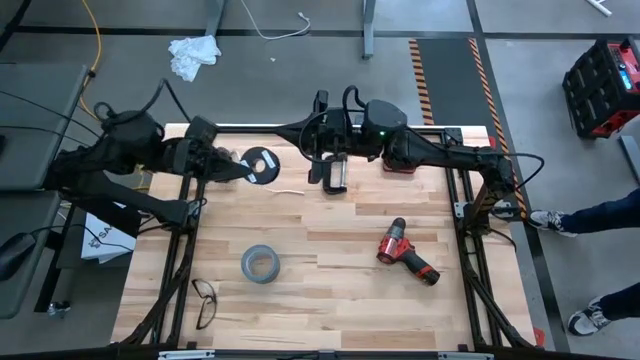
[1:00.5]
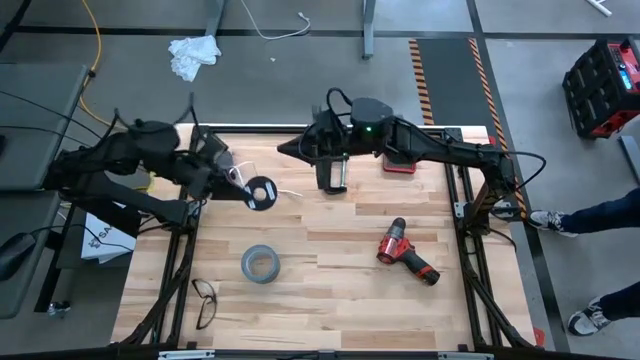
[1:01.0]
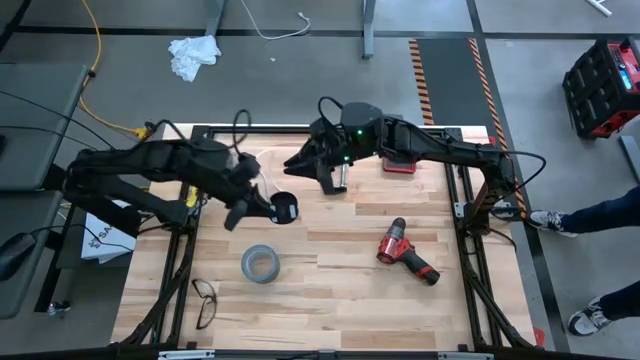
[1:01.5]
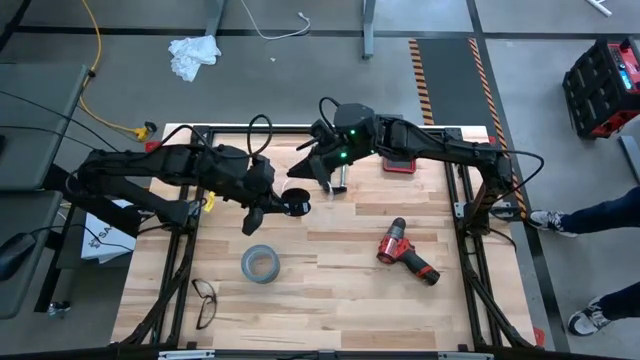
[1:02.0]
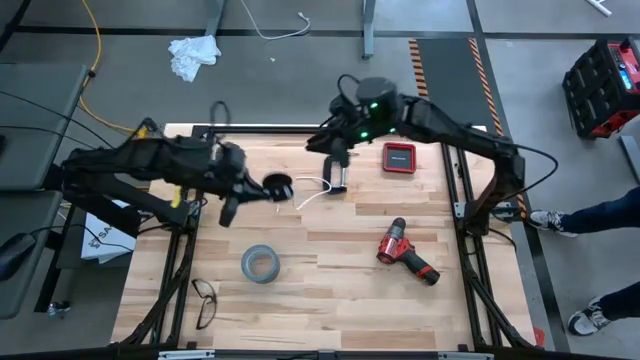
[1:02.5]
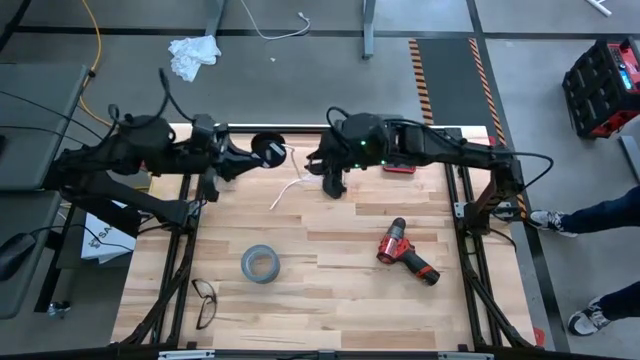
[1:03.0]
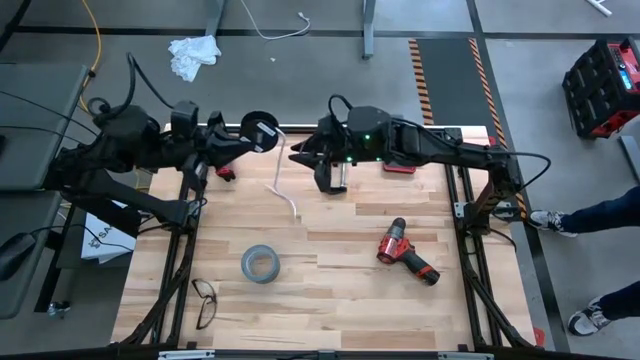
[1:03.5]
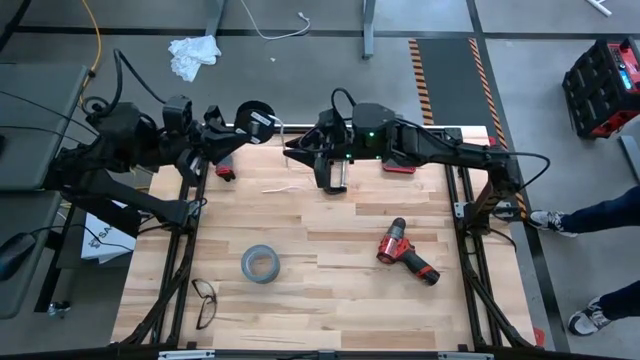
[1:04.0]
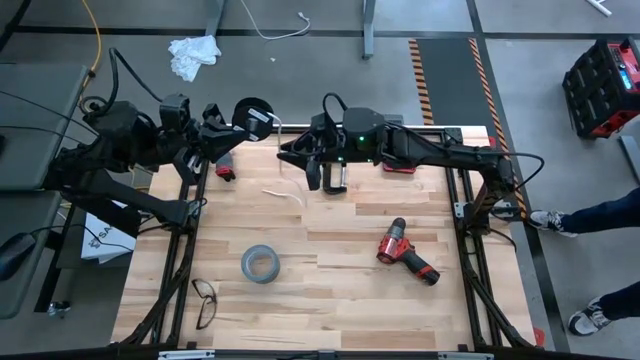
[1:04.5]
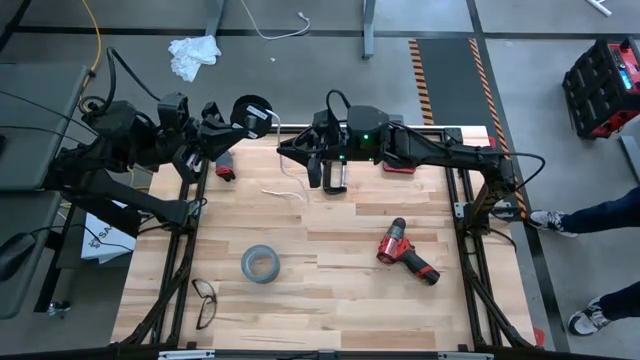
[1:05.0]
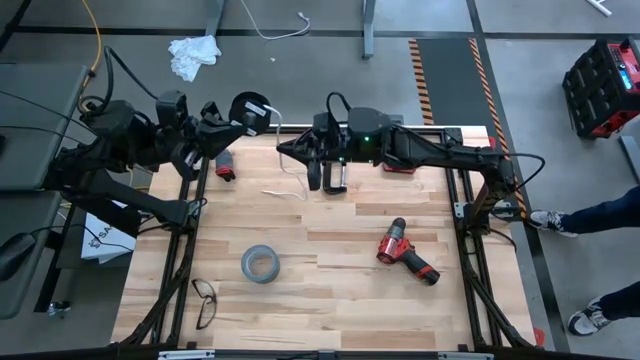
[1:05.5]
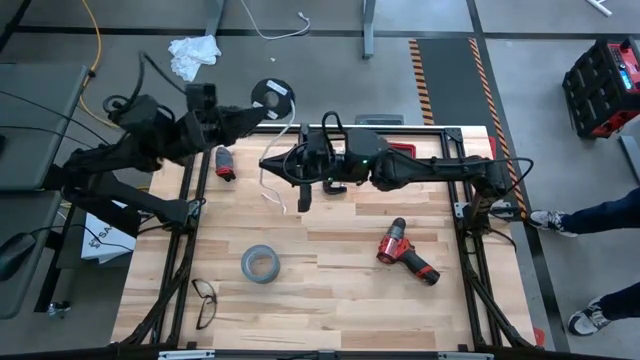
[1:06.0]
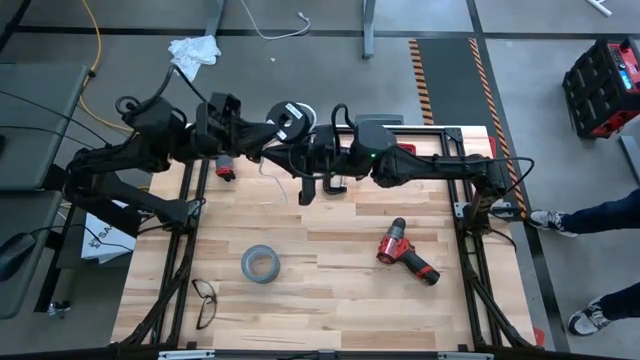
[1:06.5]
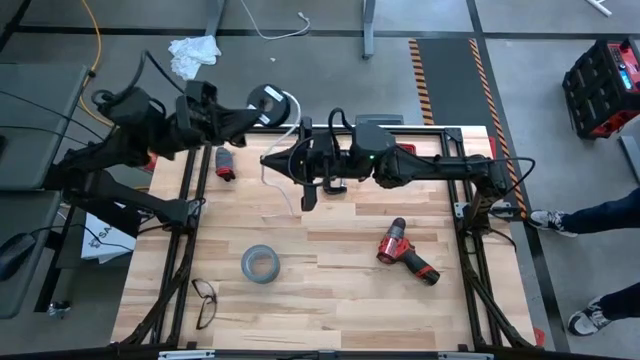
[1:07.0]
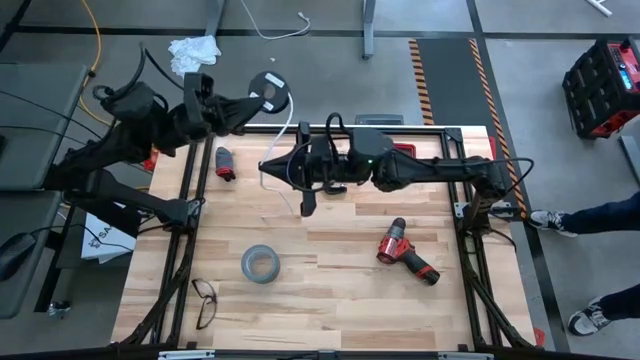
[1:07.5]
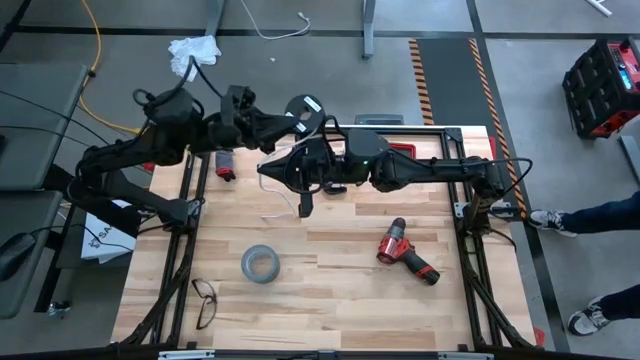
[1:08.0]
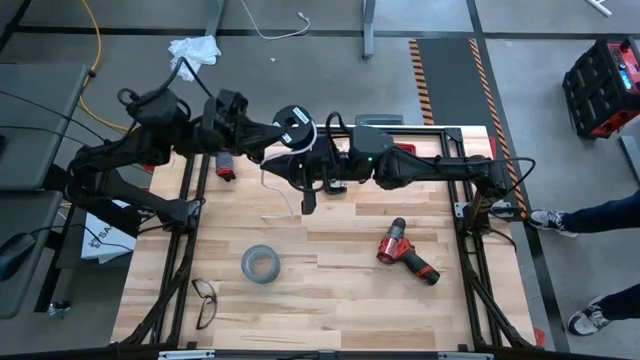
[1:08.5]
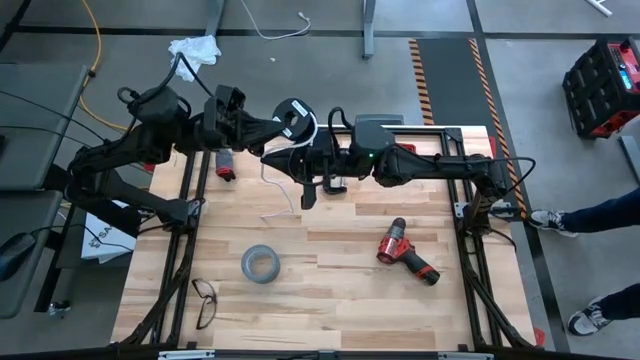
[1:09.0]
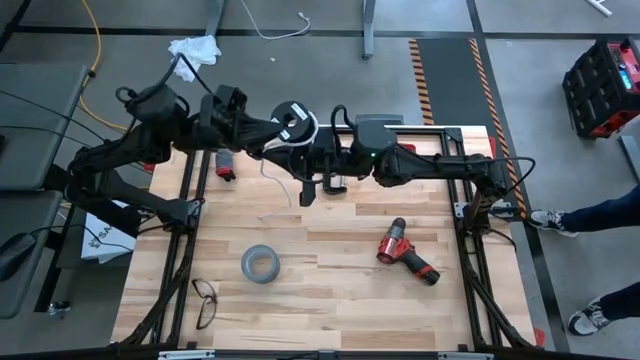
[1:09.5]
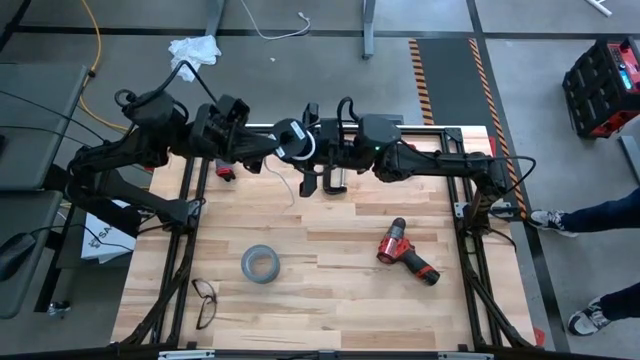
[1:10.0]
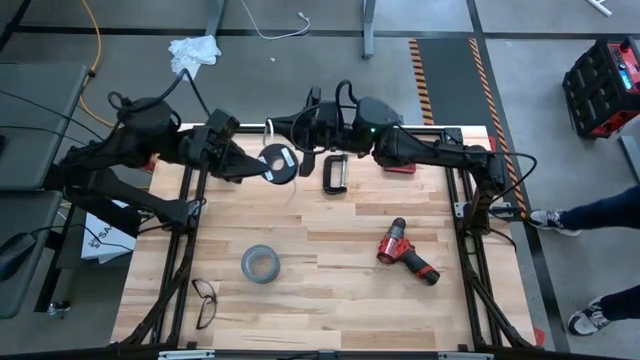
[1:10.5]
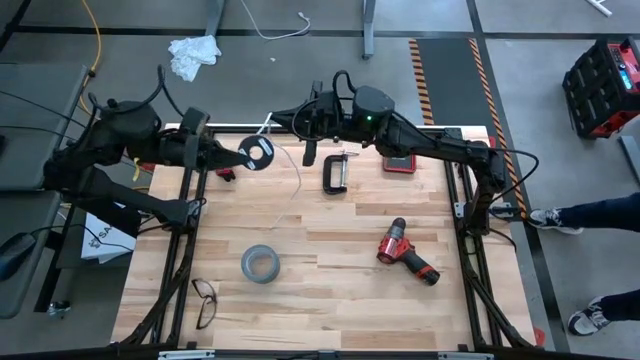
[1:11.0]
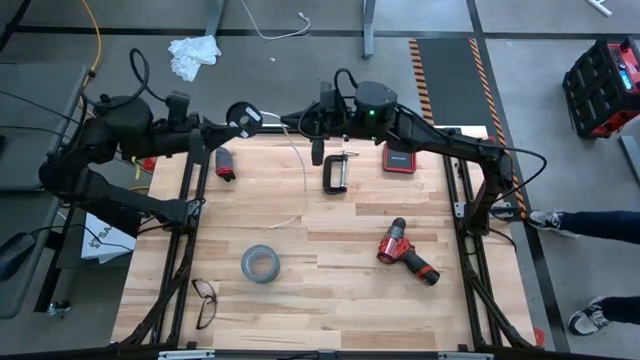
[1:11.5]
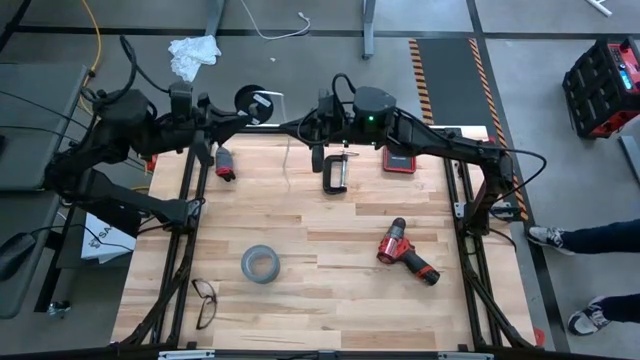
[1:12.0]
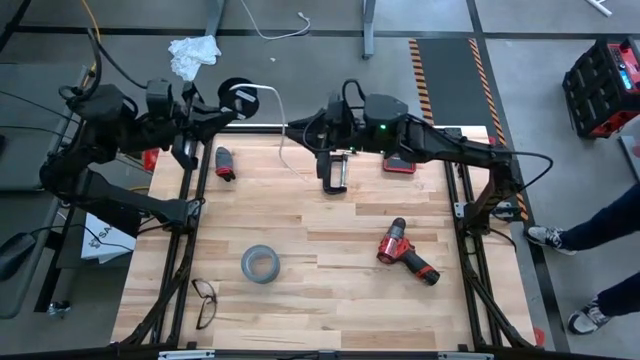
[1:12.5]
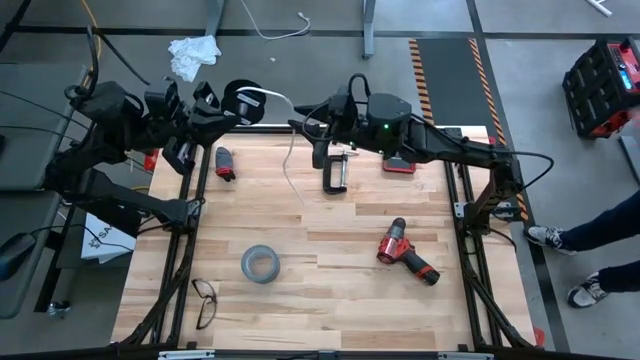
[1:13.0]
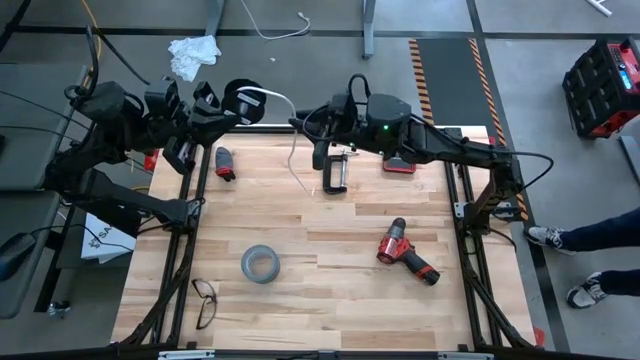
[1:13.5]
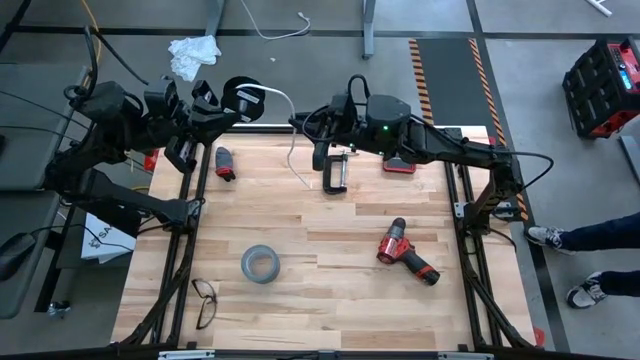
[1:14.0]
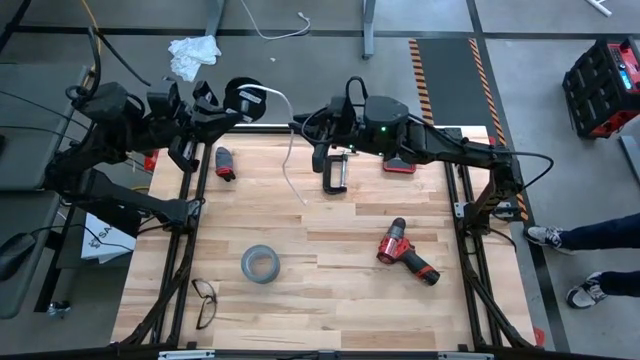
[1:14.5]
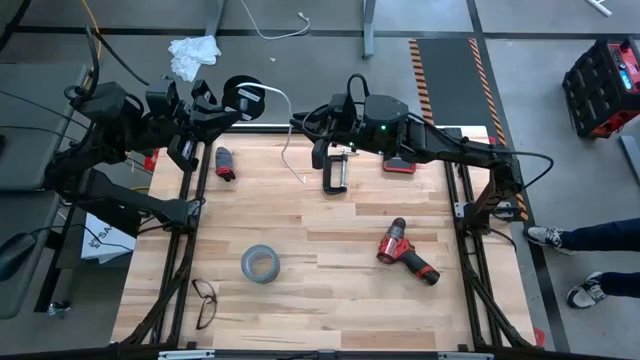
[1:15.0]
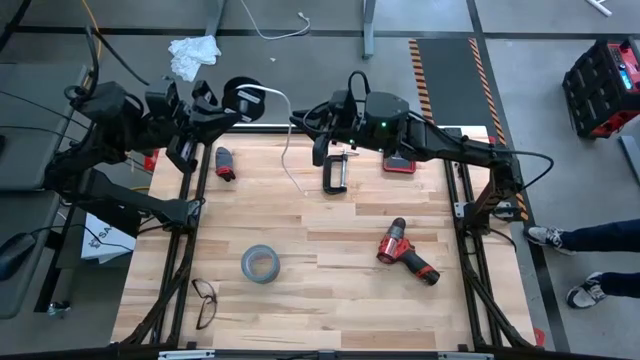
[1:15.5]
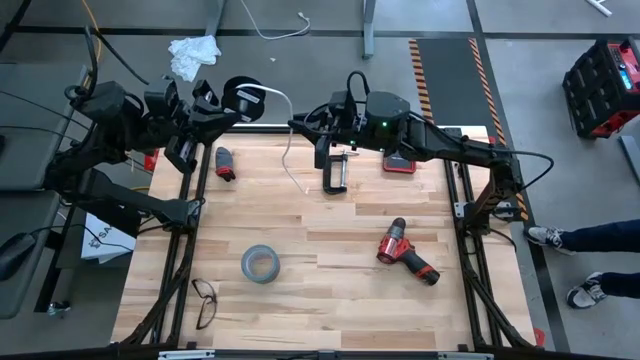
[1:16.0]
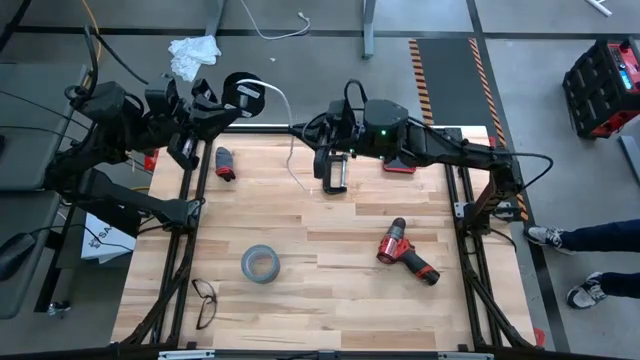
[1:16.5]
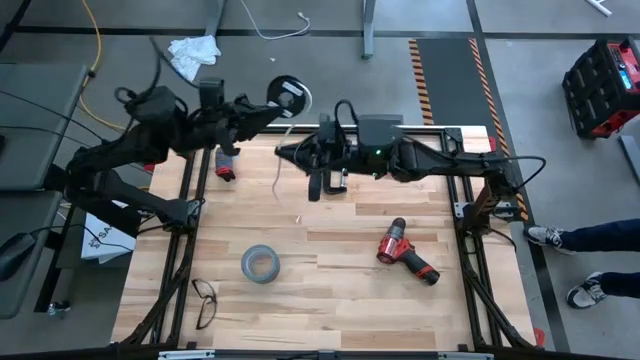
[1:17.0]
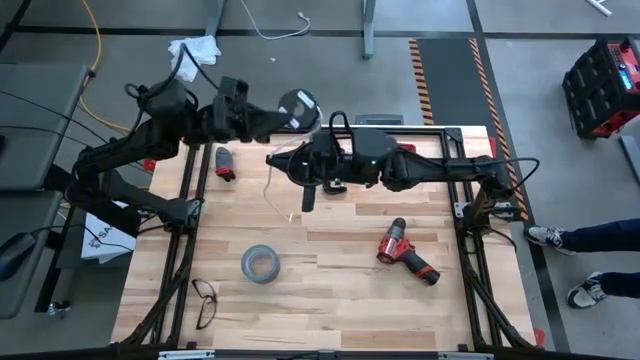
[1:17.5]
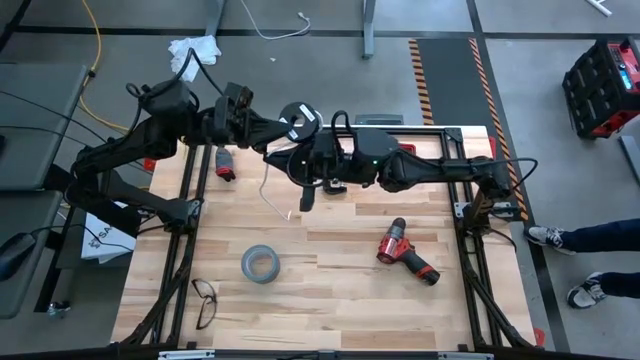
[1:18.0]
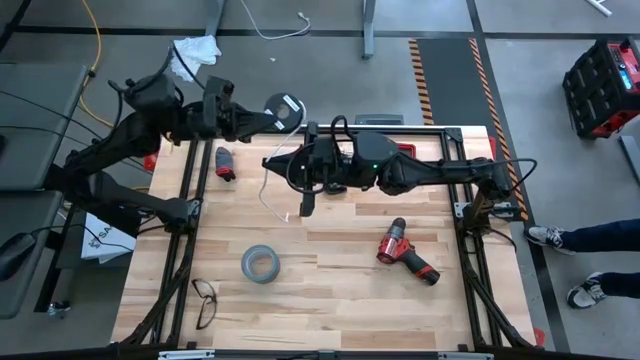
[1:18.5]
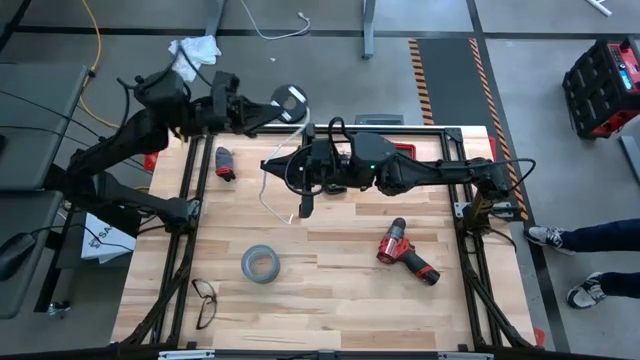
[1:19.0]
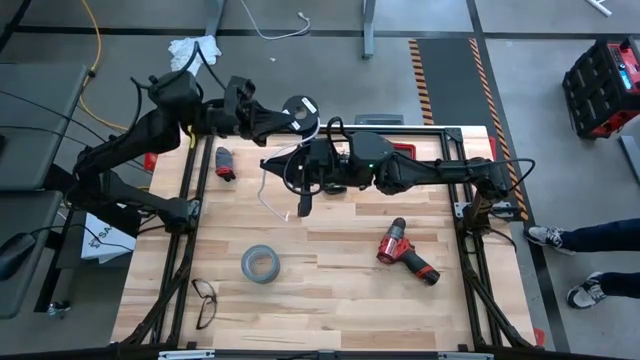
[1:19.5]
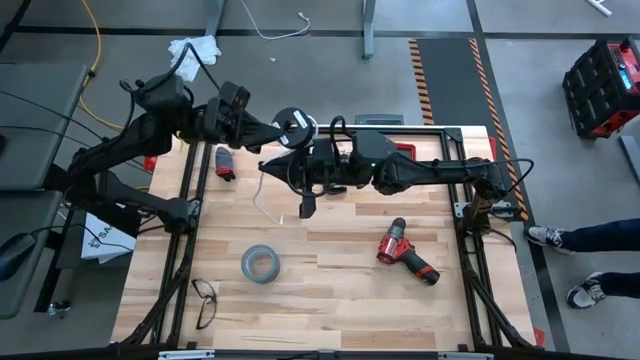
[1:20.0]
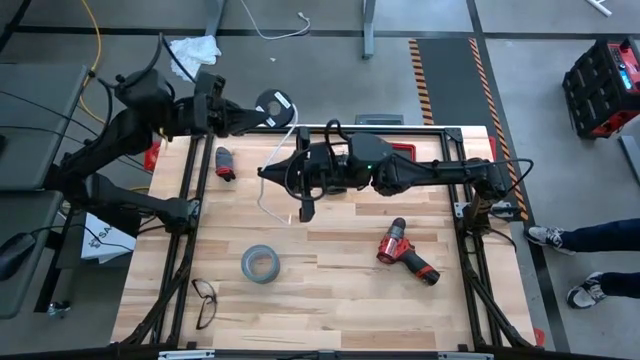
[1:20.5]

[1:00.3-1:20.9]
Task: Coil cords
Coil the white wire

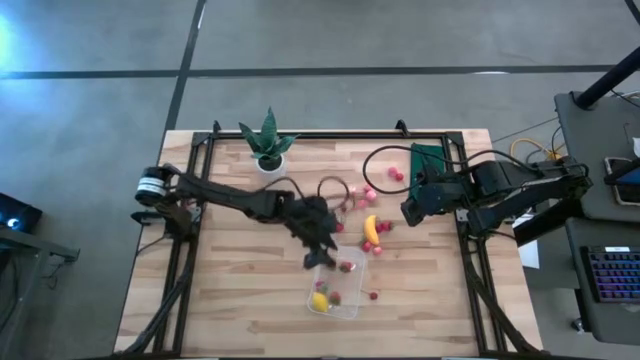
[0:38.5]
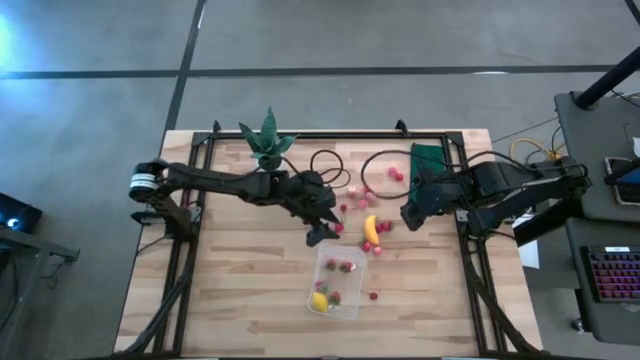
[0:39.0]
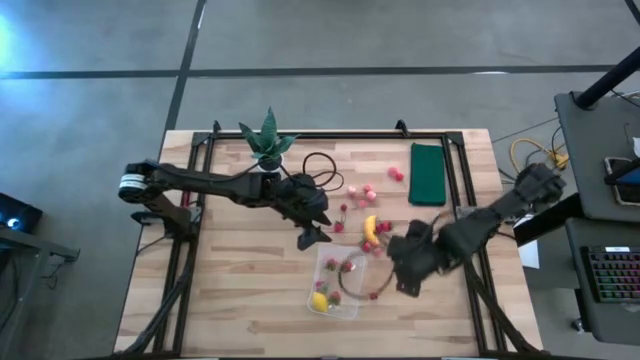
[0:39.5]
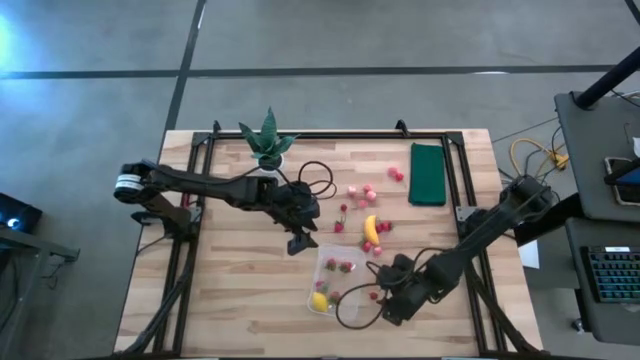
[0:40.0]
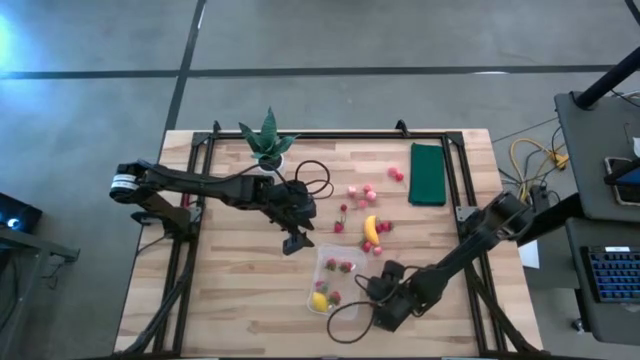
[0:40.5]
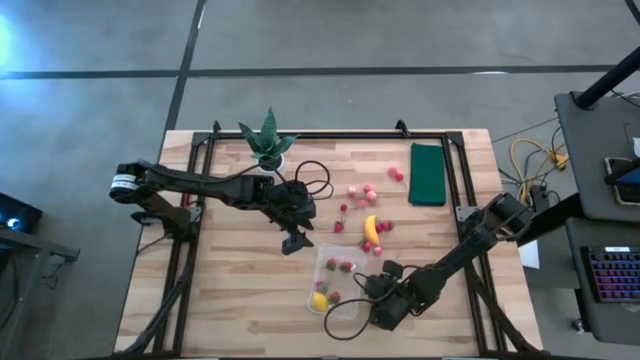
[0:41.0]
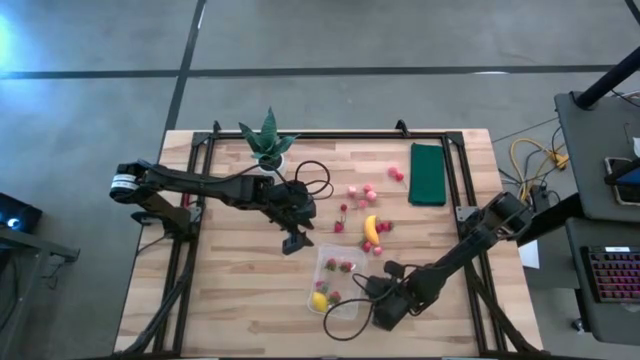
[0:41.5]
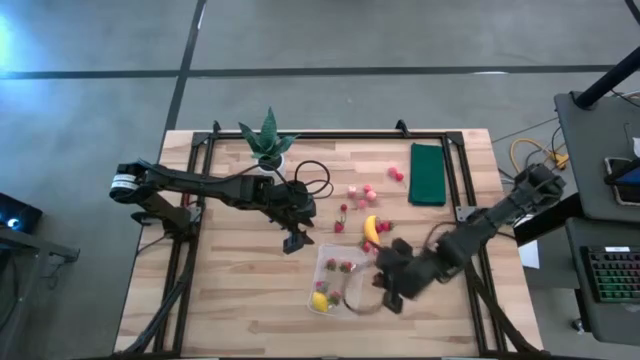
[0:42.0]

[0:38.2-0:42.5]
Task: Pick and placing Produce into tupperware
Put the cherry into the transparent bin
